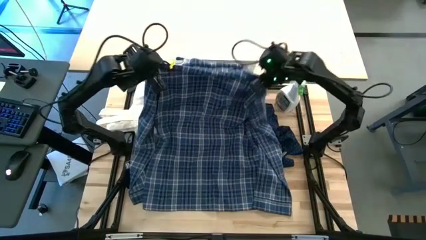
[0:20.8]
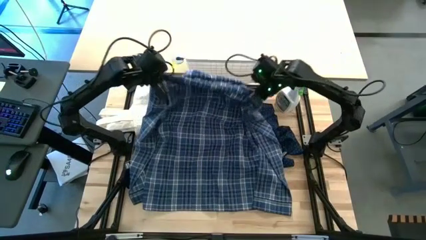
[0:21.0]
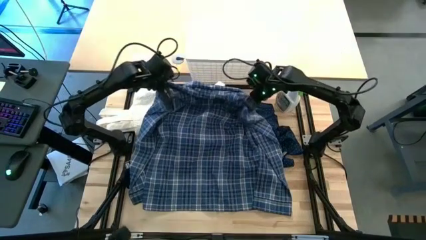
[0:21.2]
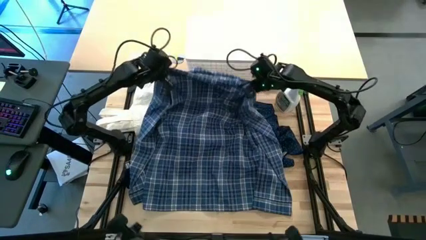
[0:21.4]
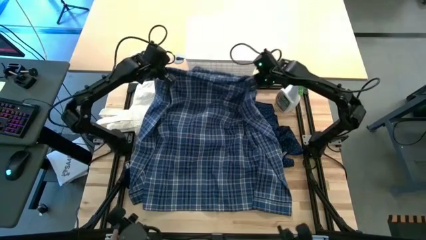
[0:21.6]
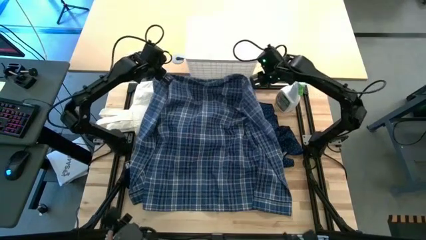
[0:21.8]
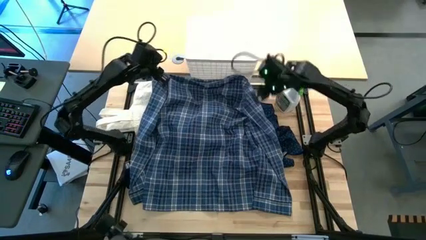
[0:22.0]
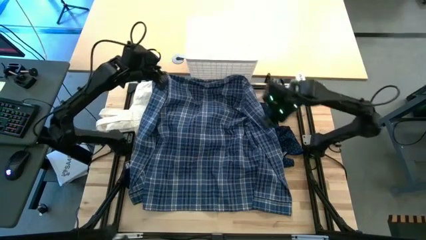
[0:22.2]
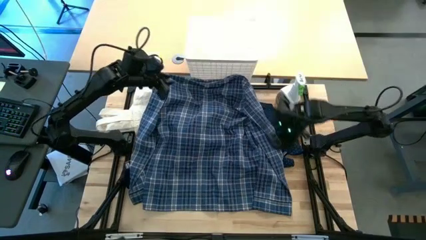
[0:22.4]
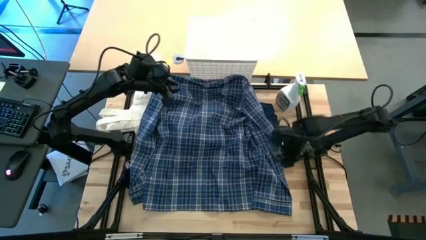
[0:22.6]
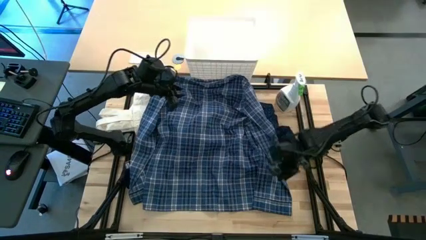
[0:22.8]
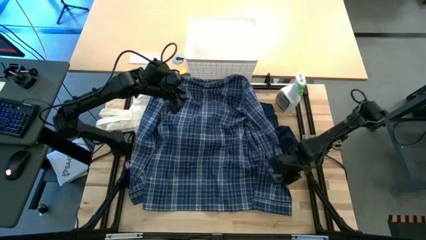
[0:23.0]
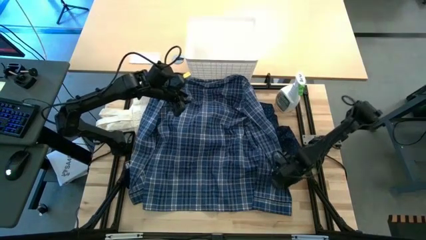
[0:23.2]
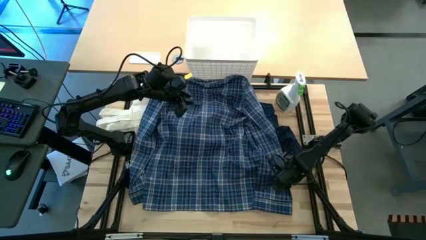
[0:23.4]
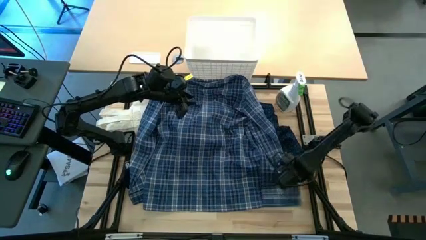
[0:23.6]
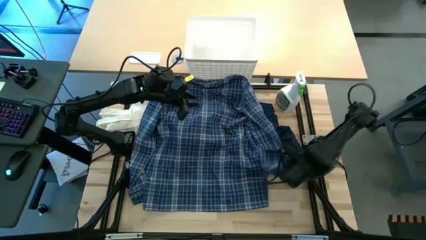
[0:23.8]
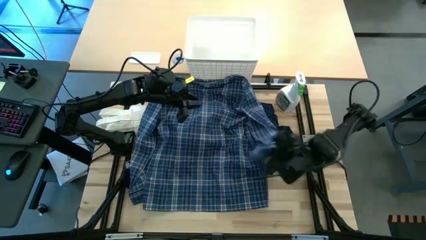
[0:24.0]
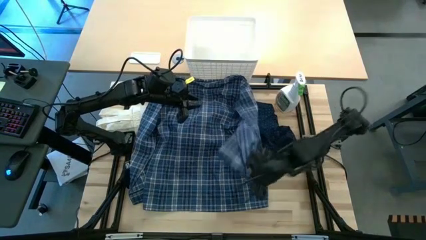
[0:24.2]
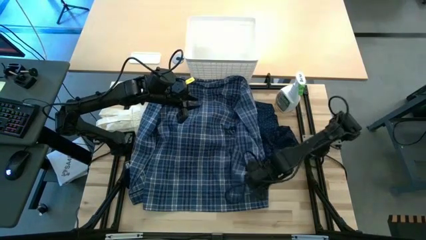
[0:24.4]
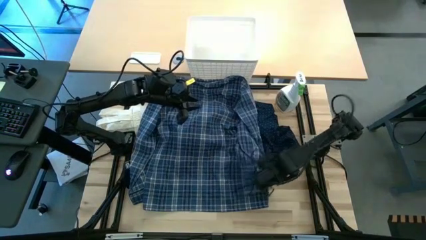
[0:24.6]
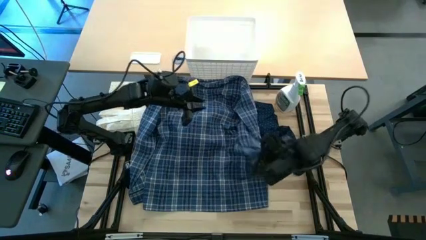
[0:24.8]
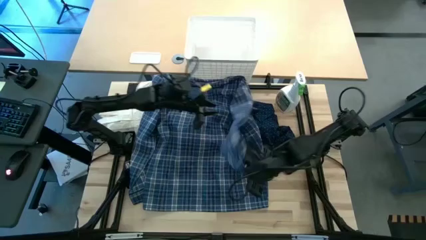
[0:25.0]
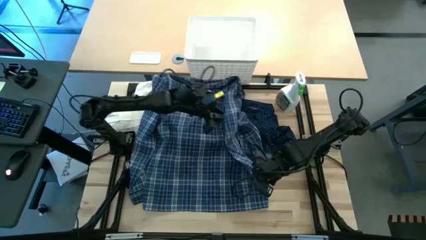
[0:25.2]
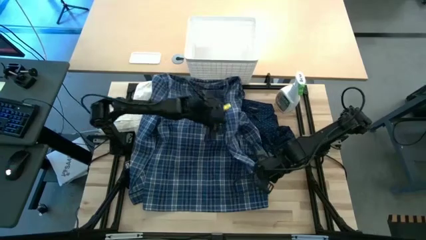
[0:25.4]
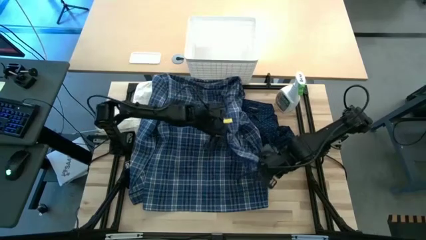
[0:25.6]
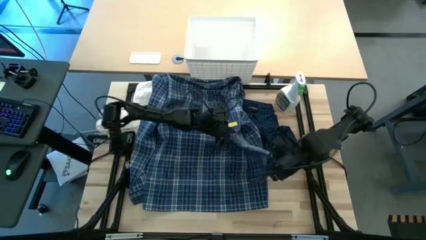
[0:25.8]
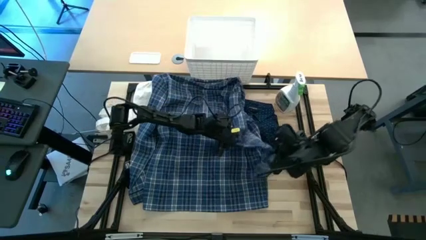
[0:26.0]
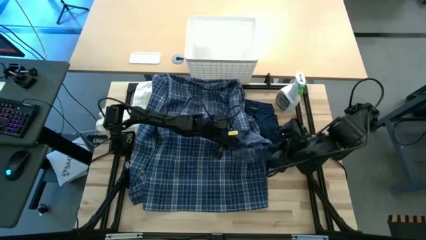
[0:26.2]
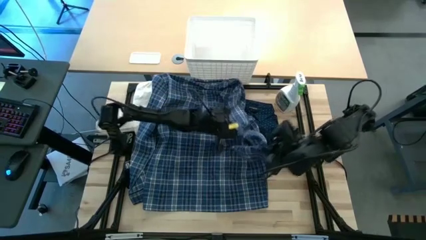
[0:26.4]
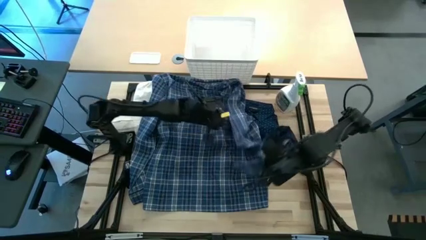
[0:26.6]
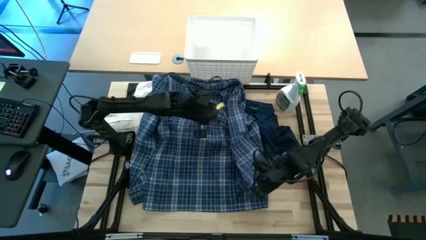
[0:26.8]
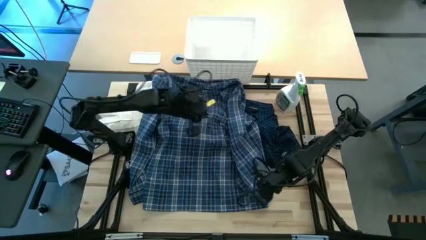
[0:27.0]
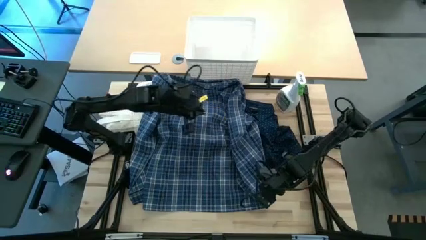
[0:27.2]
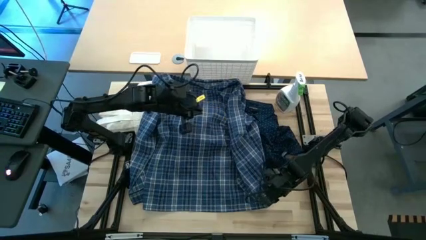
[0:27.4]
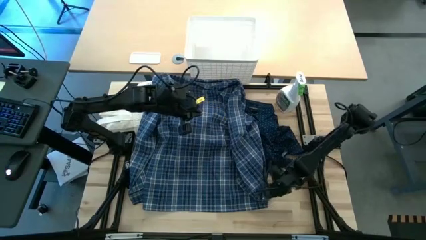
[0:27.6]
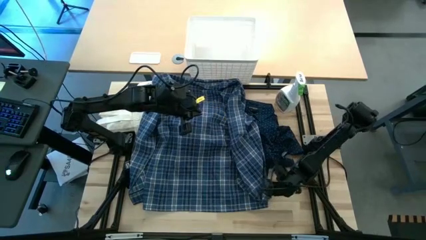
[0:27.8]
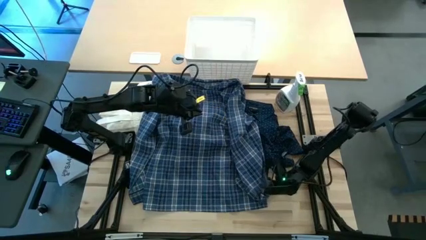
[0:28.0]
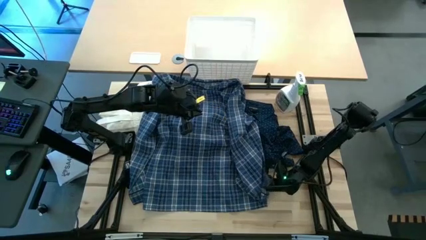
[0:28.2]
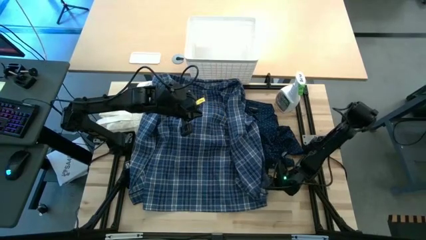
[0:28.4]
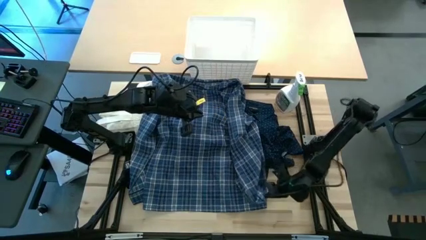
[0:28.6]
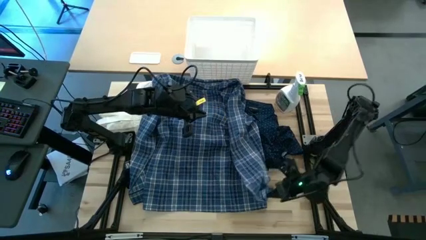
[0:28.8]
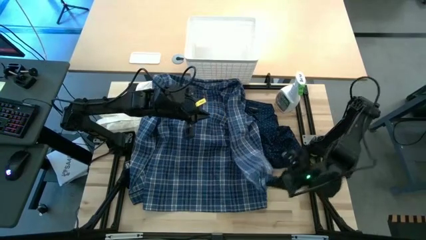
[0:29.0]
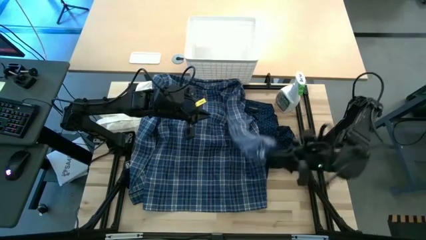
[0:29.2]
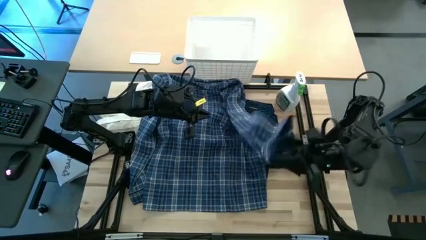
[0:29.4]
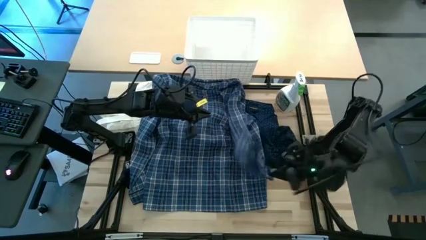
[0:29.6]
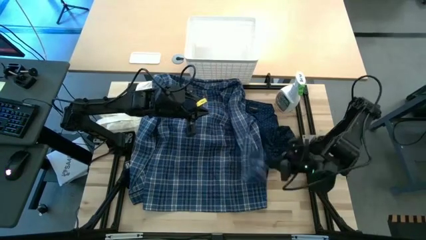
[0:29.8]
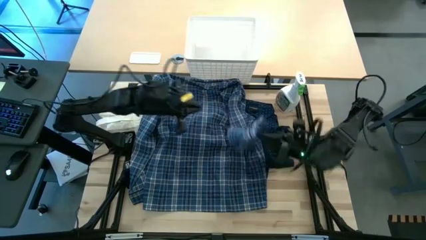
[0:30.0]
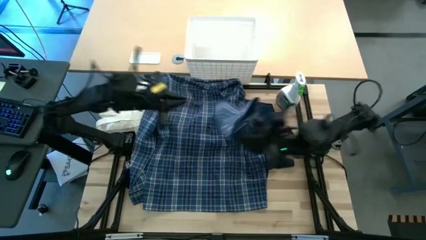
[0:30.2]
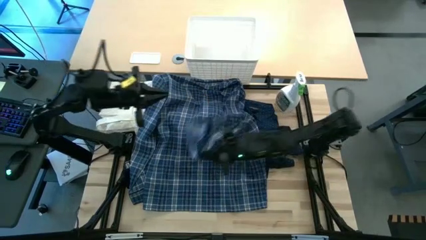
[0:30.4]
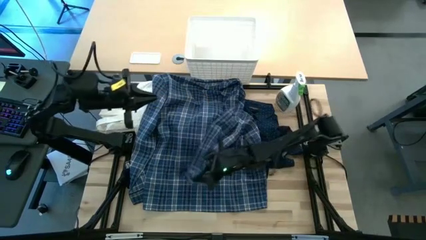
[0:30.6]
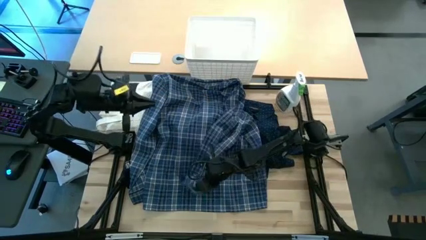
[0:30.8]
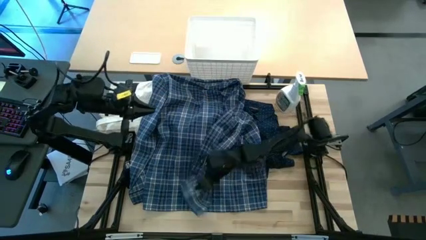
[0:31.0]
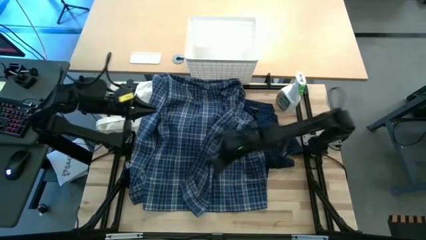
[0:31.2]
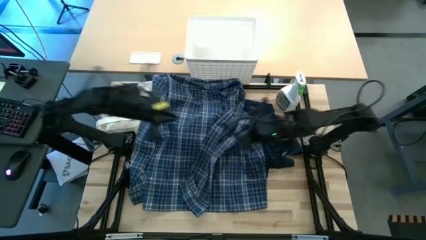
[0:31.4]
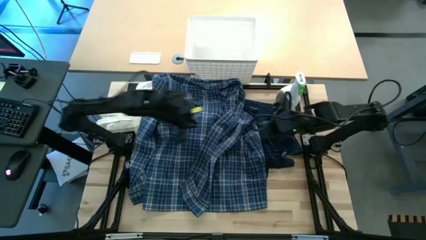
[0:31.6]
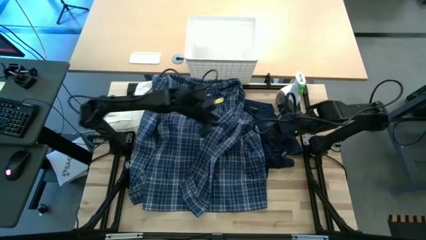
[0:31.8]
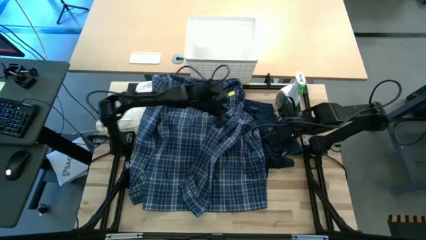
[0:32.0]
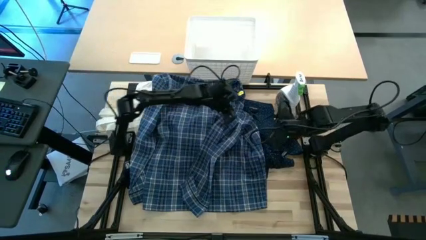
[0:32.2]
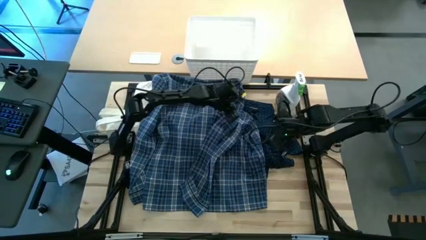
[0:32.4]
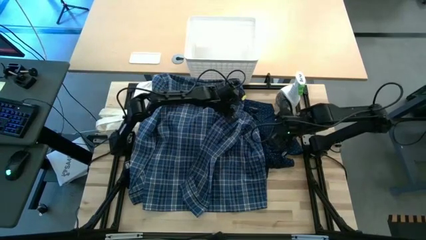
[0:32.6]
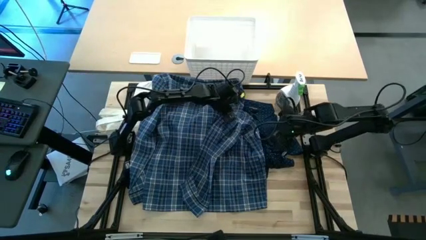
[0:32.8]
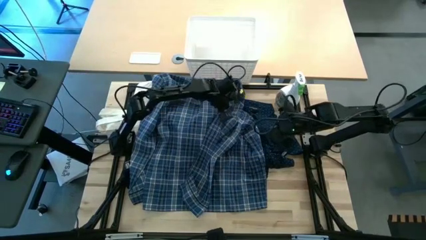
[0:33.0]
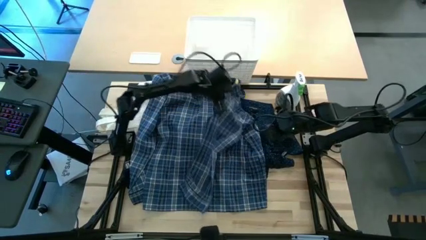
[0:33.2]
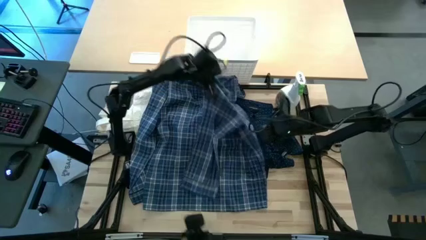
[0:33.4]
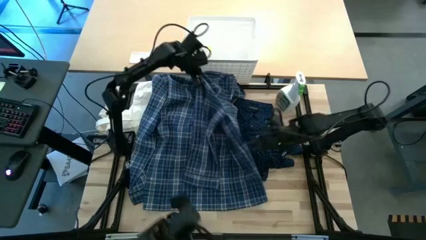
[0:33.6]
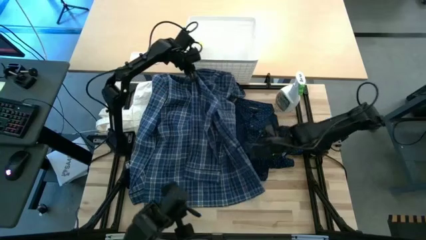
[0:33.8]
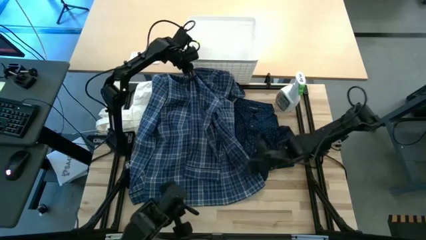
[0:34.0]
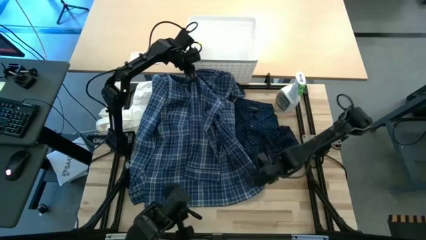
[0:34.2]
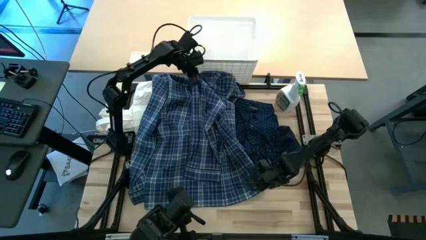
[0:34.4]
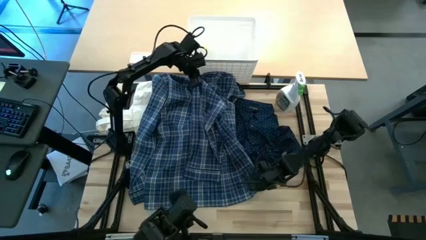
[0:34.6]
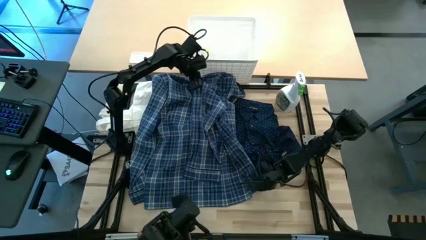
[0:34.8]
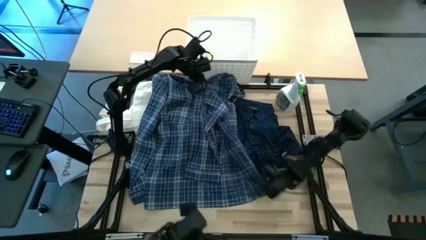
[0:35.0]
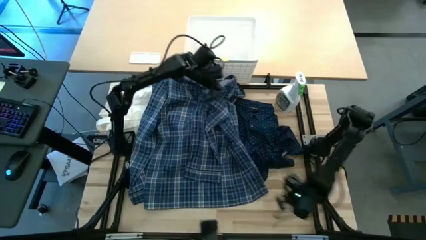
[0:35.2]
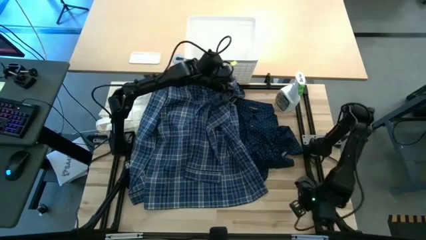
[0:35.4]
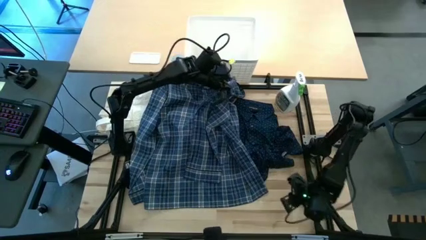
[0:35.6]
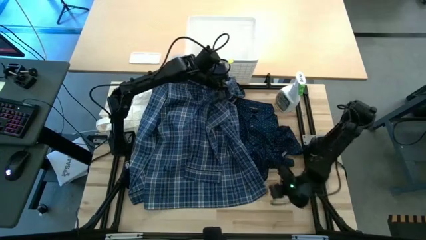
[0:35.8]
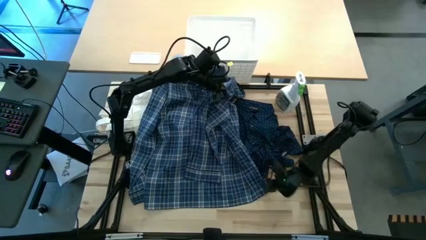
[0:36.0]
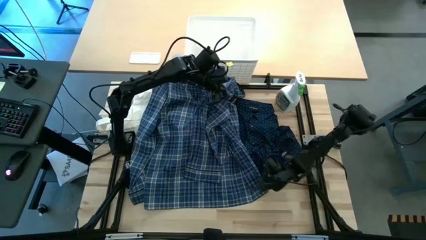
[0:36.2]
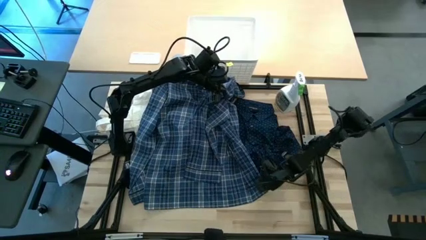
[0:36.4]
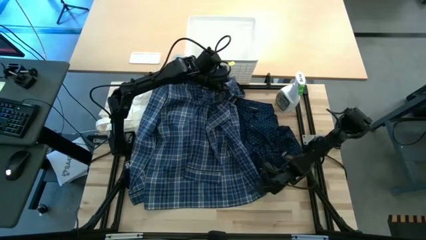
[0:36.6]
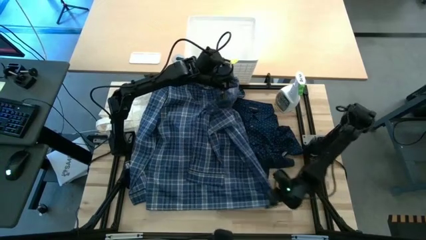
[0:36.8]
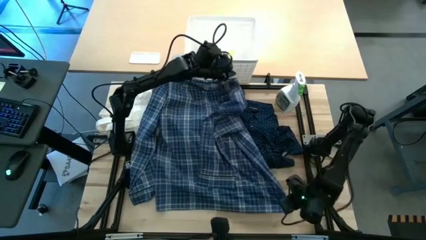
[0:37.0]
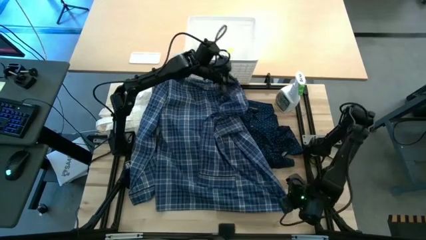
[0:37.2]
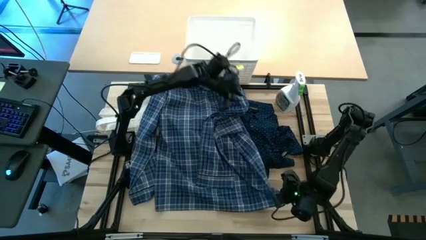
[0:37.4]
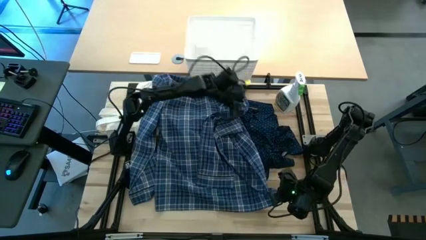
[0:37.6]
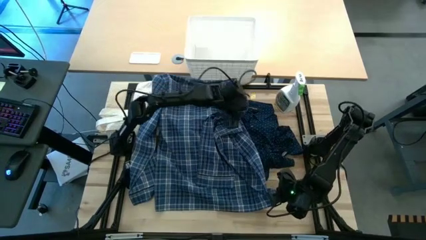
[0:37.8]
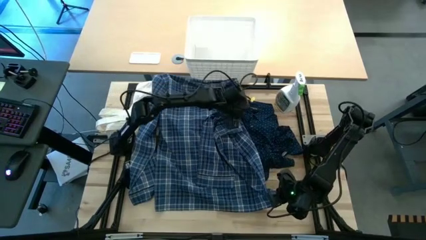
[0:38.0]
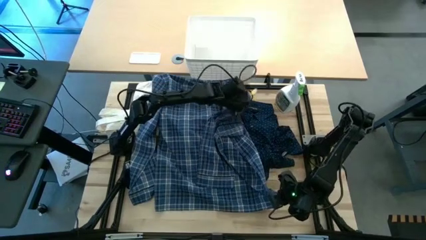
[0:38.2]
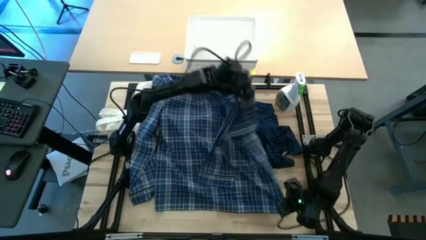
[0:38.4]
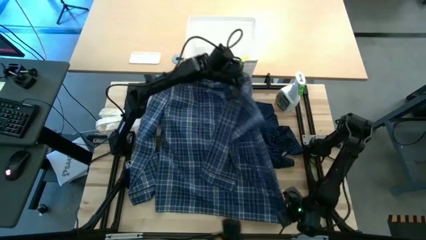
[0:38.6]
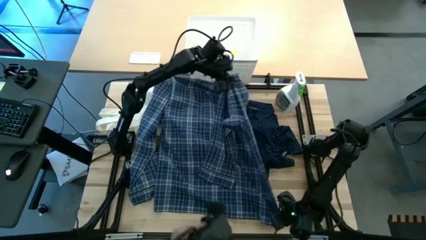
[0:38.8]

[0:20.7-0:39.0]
Fold the checkered blue polo
